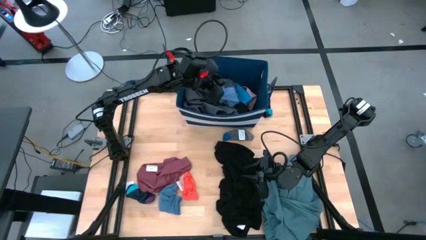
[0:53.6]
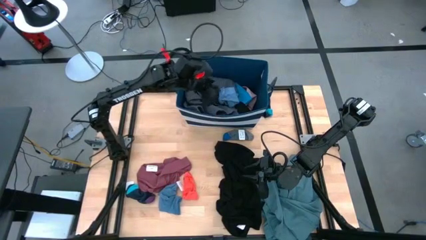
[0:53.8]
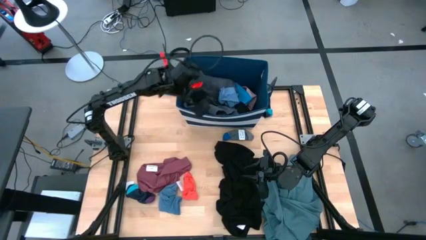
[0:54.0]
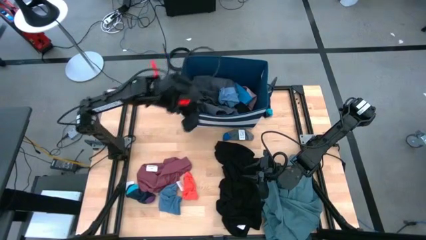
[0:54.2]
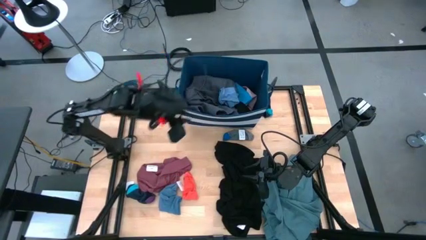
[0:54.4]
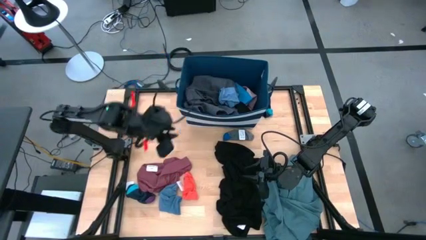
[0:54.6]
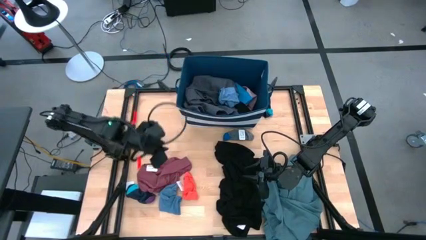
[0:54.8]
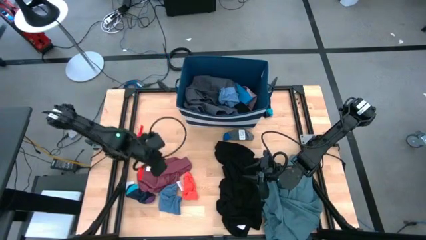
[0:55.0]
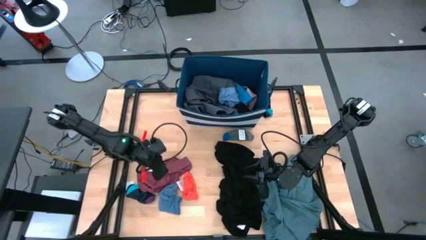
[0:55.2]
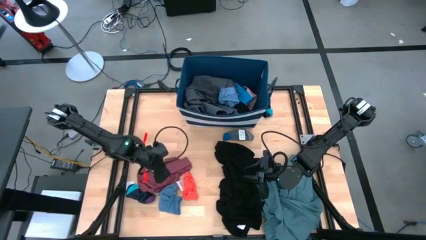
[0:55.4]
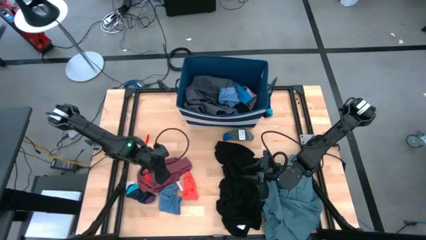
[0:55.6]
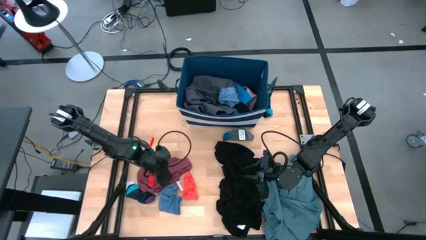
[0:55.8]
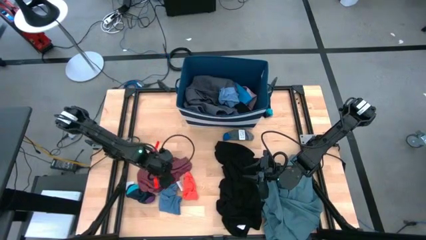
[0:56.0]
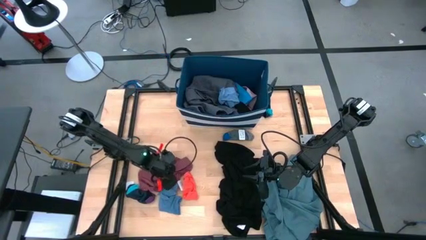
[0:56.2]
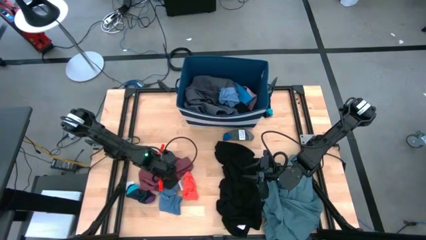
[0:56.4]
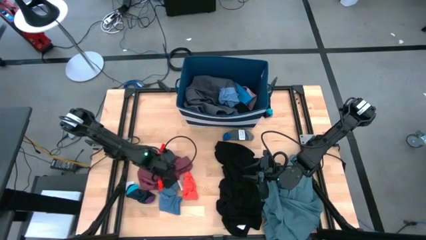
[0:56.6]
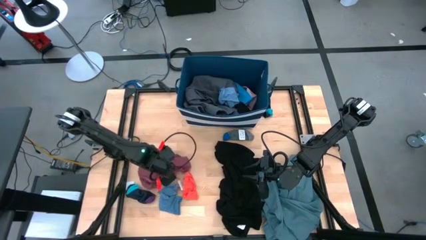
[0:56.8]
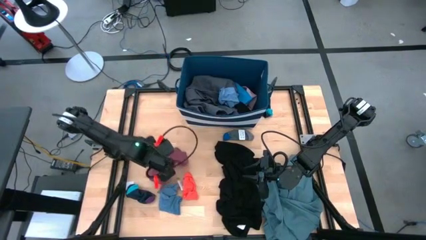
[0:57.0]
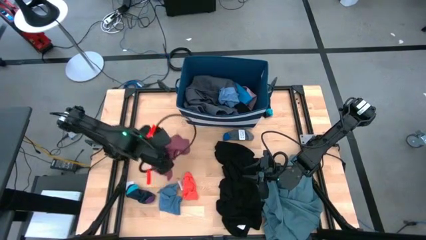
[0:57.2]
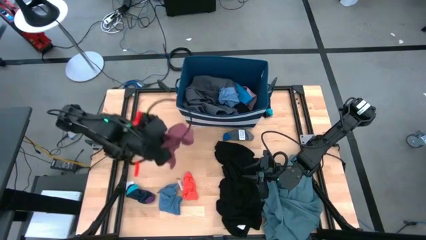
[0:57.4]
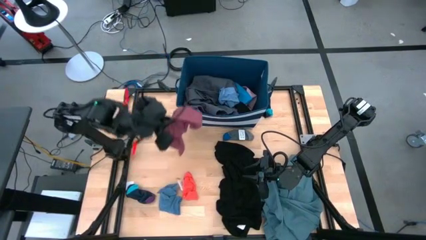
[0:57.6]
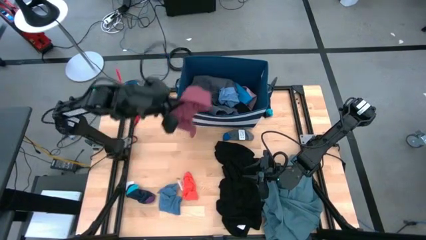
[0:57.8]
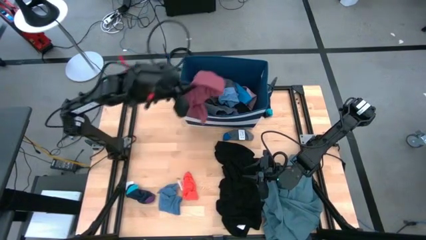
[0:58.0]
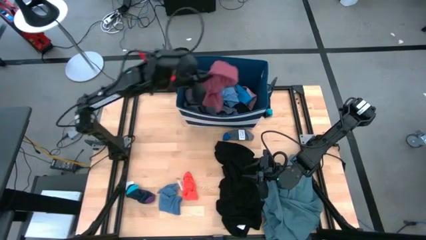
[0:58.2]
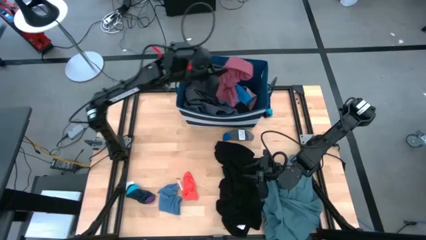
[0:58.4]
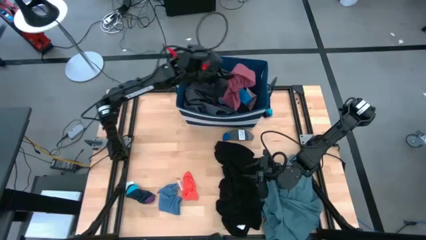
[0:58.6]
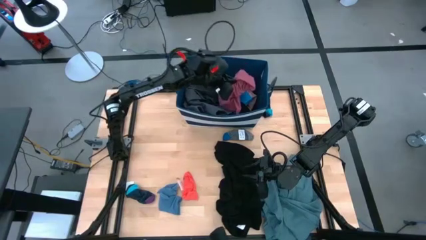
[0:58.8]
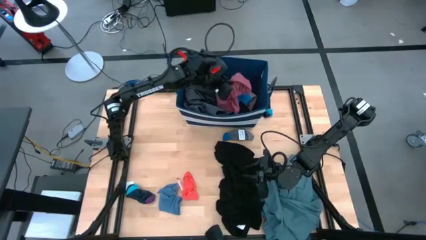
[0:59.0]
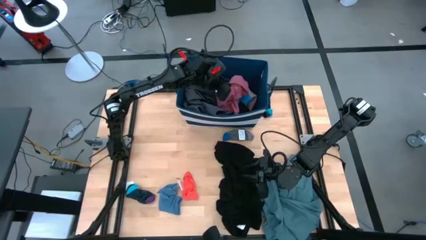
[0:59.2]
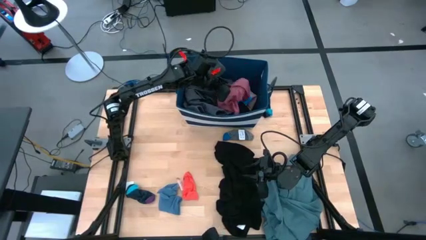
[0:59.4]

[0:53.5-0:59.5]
Task: Sort clothes
Put the red boxer into the laundry organizer

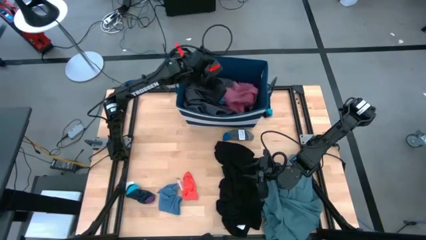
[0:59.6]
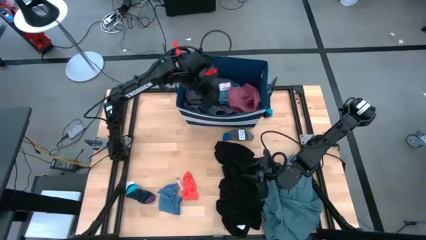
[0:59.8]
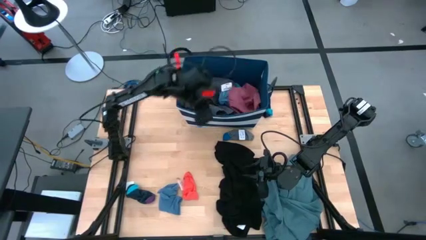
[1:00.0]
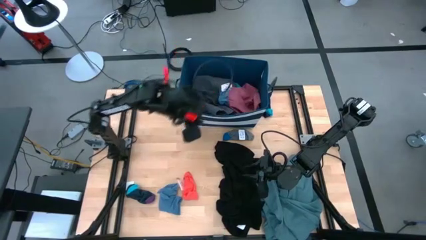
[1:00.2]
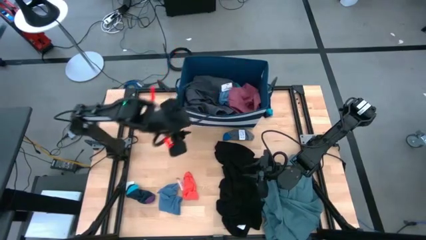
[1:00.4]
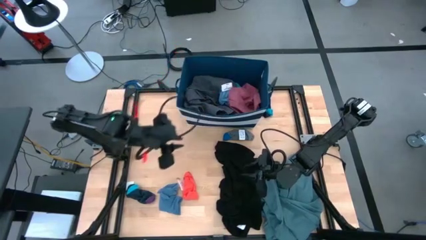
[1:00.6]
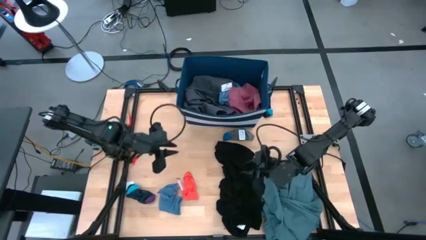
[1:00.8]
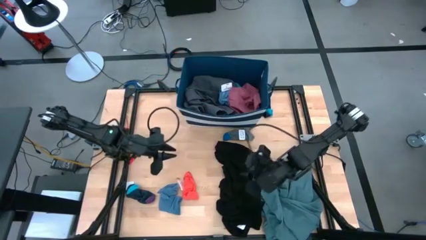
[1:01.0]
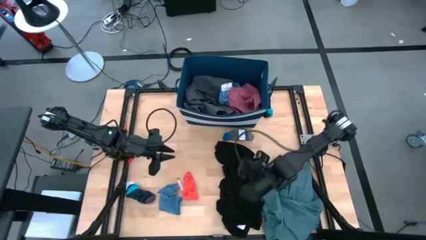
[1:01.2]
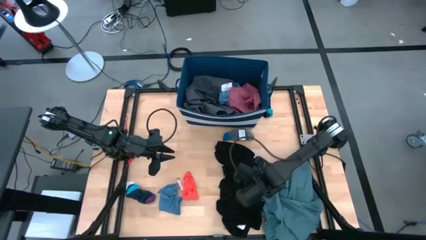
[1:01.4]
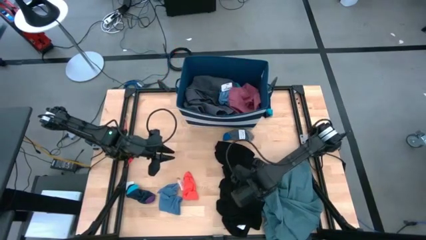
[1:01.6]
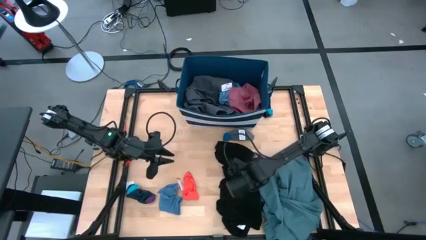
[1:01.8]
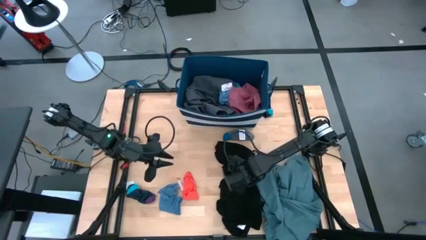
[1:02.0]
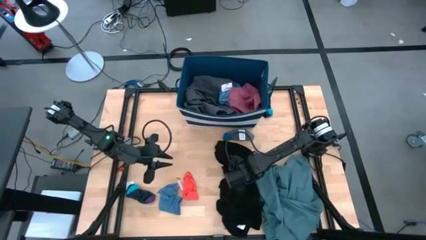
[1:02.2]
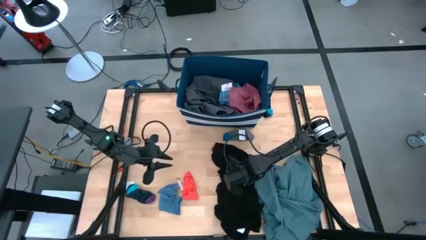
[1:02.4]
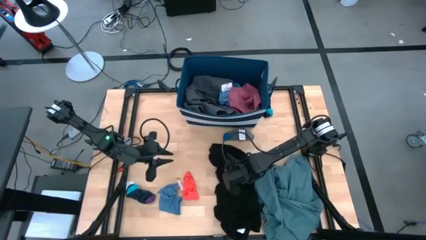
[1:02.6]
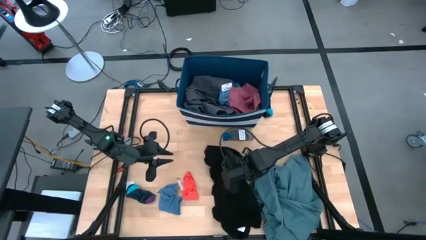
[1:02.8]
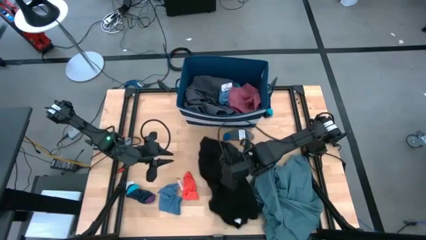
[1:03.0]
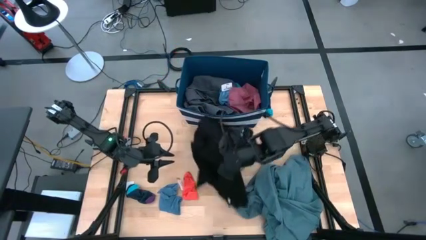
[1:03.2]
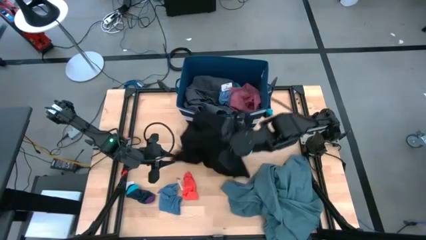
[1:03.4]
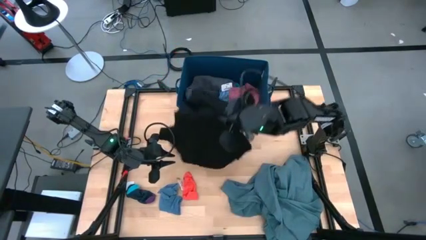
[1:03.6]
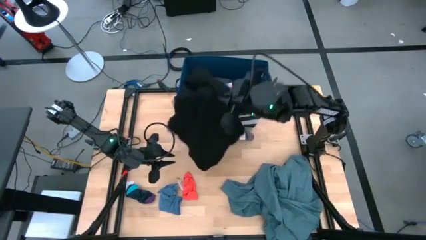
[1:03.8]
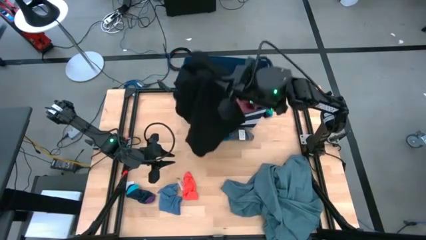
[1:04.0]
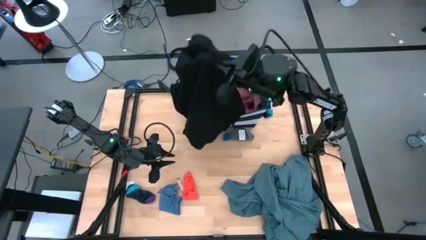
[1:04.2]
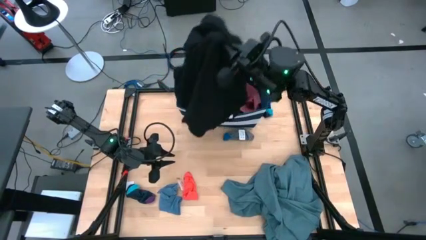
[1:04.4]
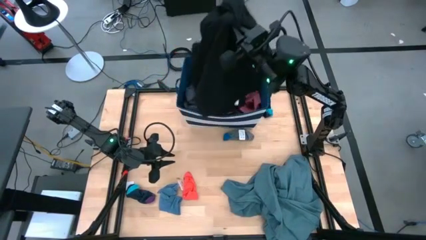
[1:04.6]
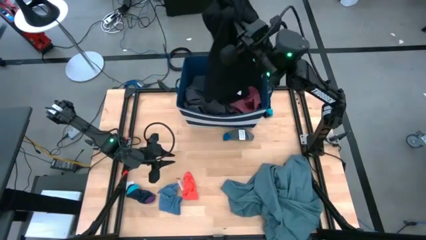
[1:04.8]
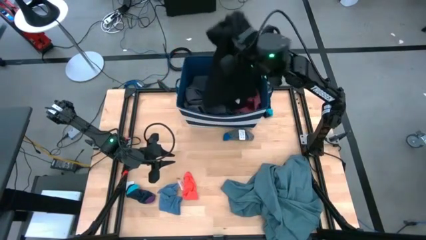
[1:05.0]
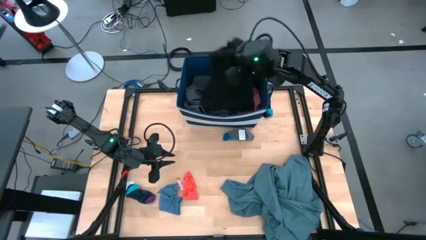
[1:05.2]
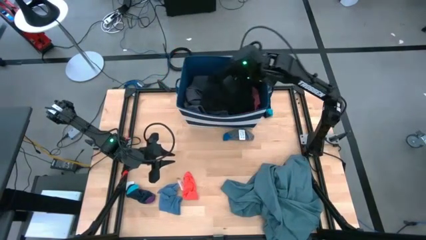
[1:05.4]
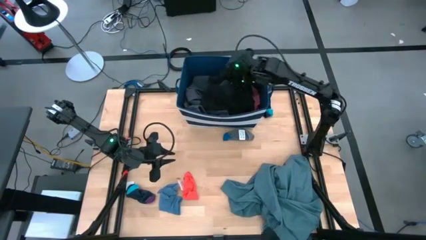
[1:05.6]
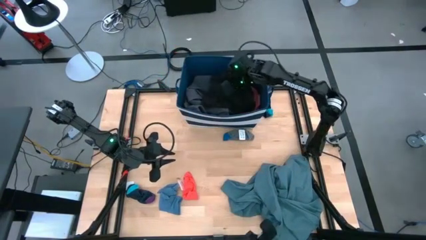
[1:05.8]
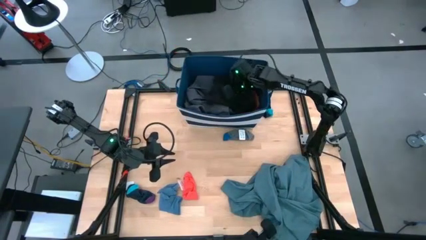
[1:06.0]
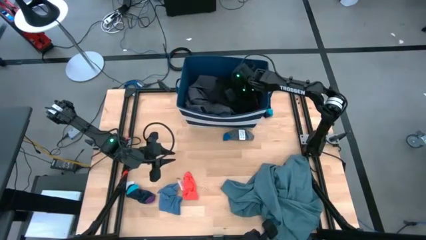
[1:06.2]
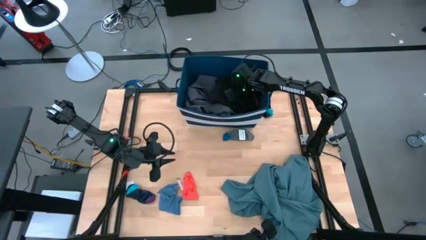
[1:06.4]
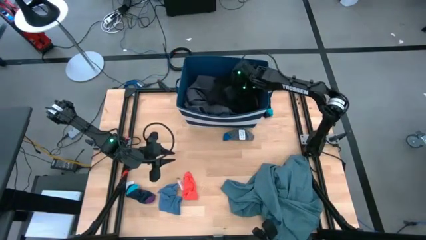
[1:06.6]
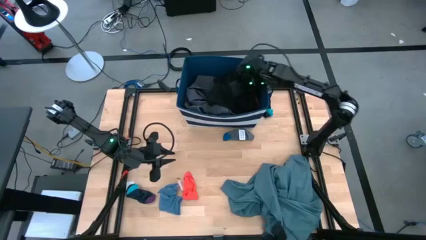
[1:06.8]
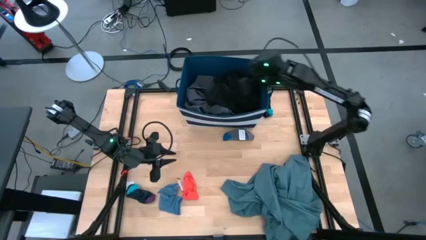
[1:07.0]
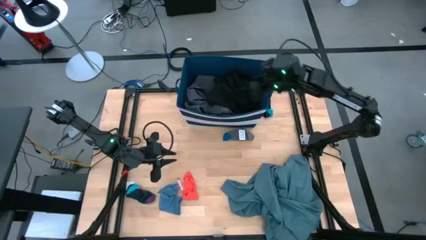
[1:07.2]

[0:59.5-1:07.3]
Put the black shorts into the blue laundry organizer

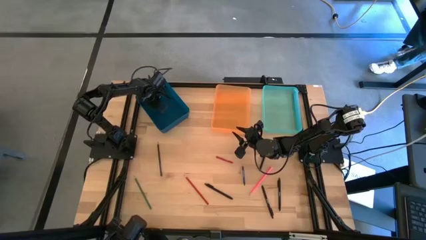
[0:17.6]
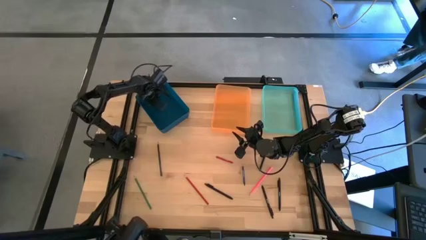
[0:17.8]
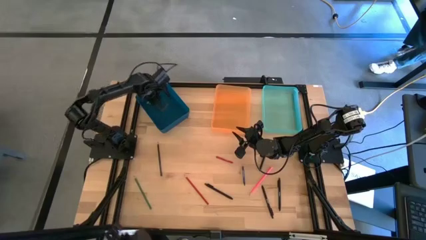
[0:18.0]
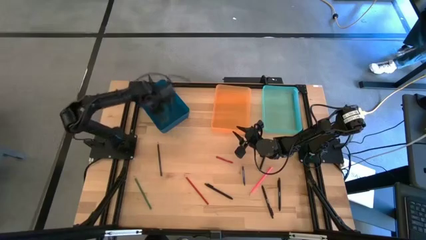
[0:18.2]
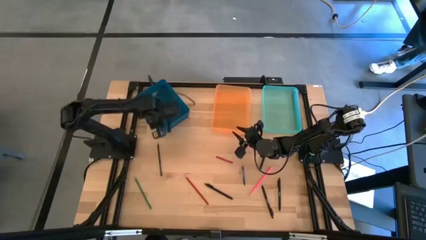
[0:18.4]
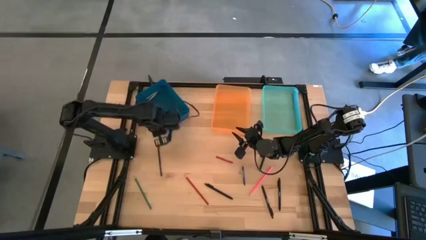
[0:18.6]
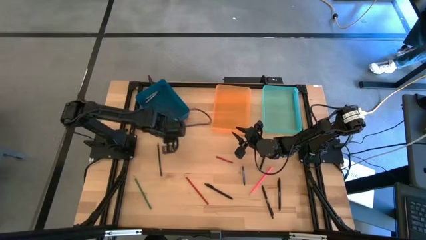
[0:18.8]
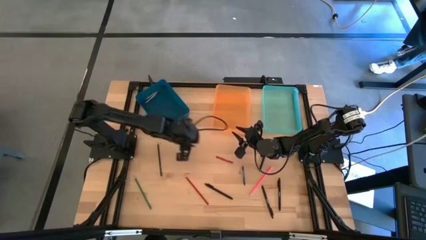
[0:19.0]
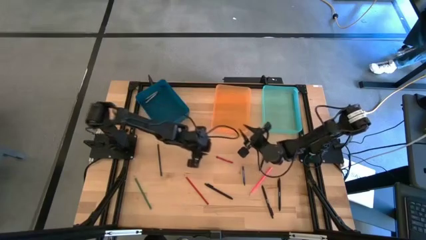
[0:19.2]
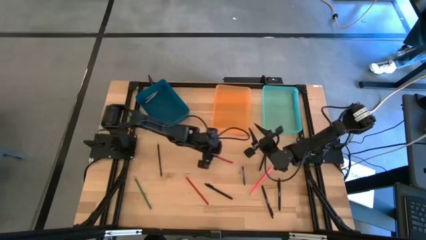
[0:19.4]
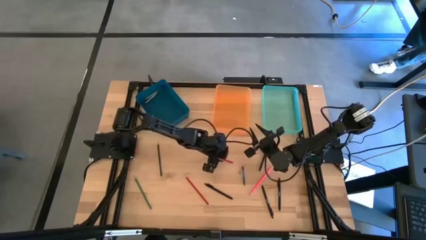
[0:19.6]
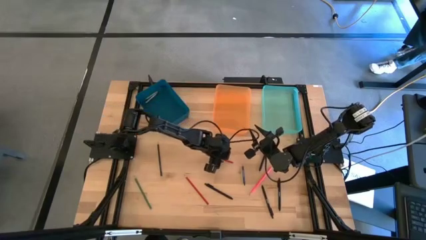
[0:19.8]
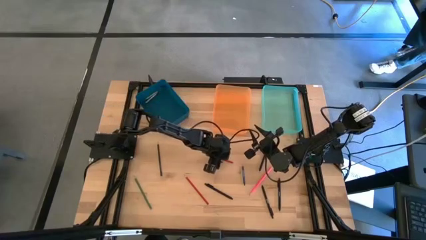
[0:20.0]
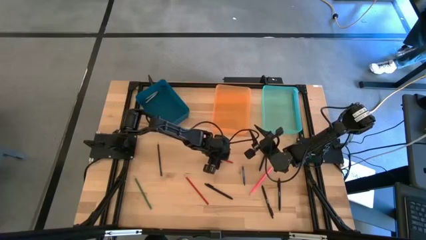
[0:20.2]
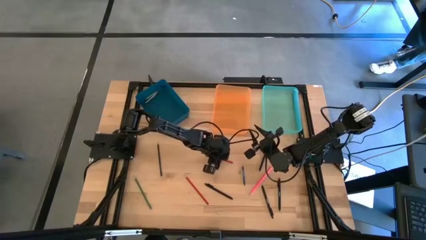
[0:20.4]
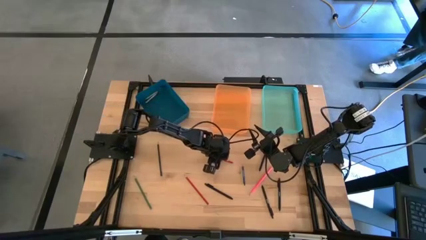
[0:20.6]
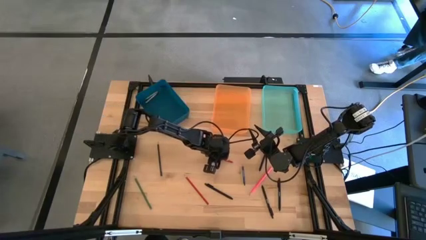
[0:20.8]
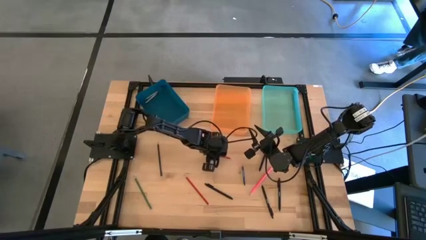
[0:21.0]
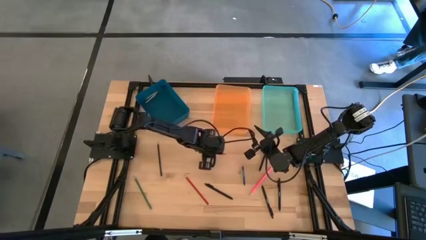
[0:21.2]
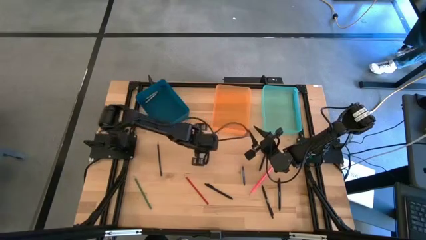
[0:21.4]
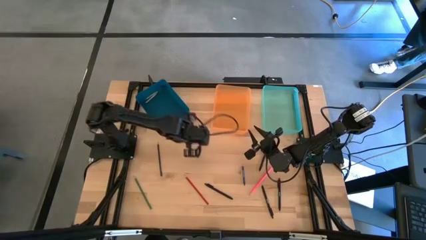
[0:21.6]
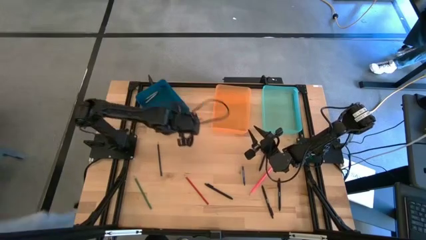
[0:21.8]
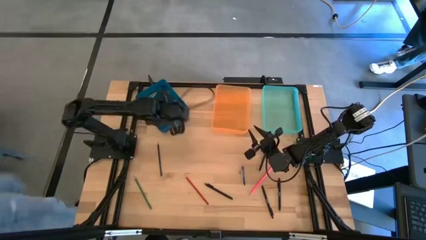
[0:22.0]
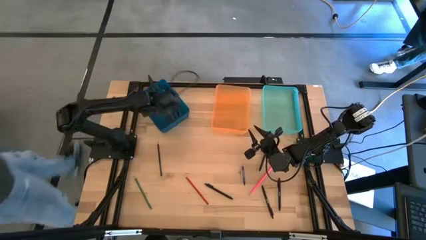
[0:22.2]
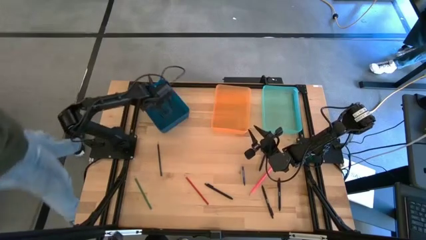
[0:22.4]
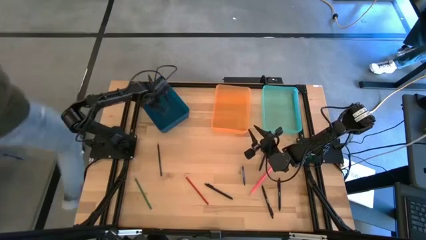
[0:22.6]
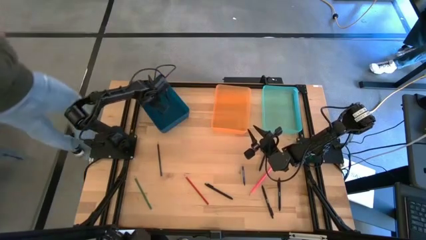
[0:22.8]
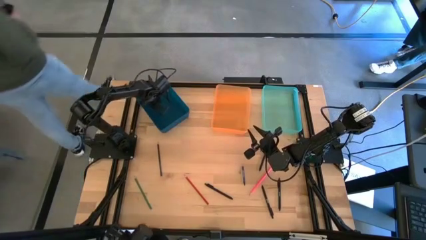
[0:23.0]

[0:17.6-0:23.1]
Task: Sort crayons/erasers/pens/pencils in bins
Put the red crayon into the blue bin
